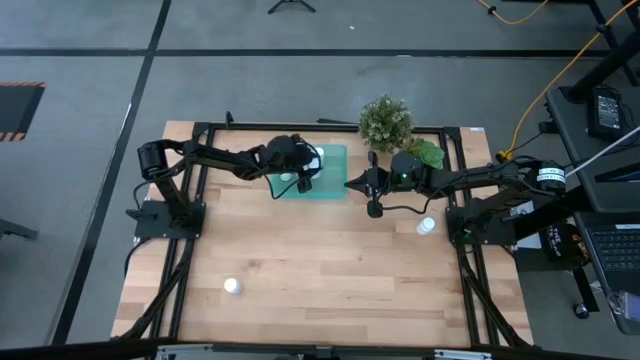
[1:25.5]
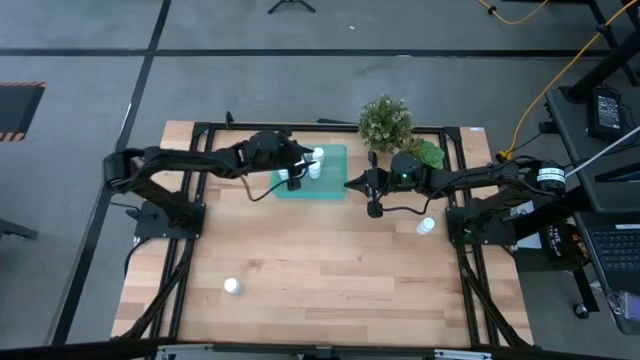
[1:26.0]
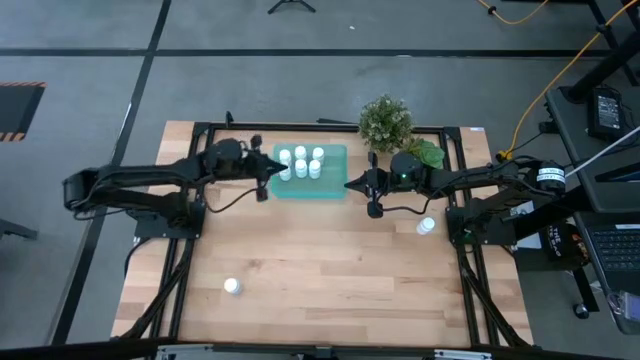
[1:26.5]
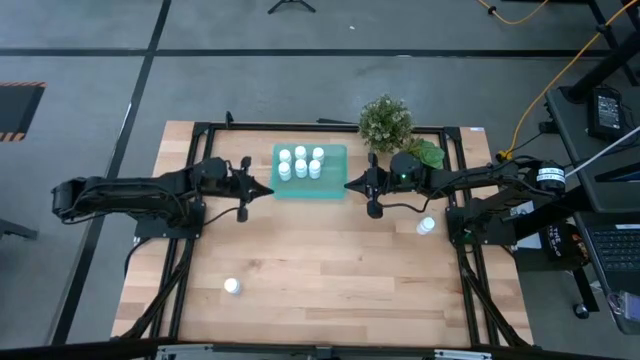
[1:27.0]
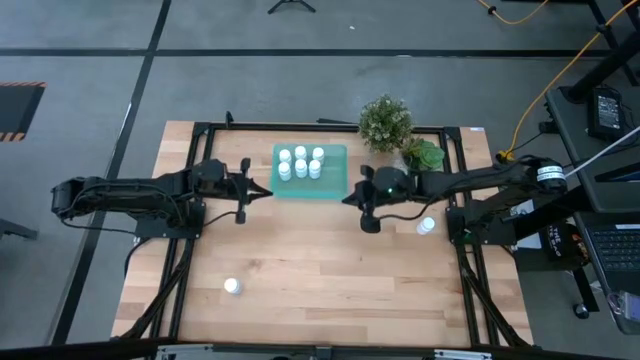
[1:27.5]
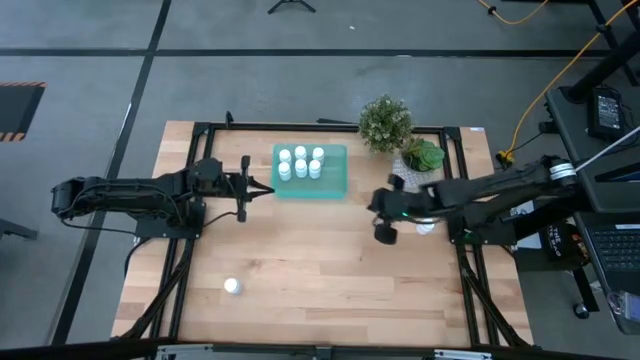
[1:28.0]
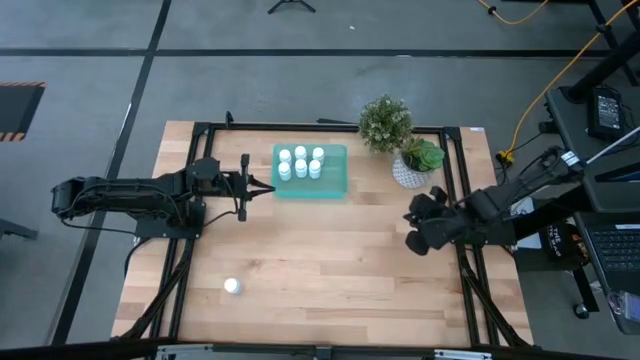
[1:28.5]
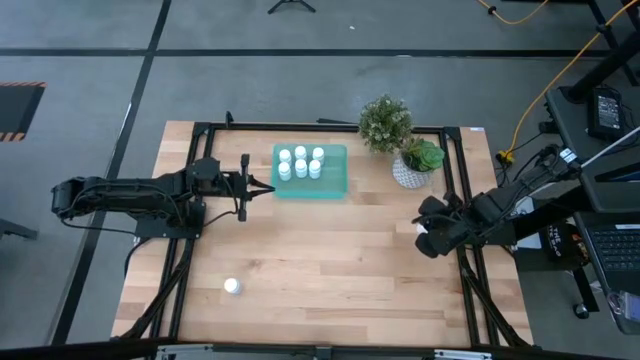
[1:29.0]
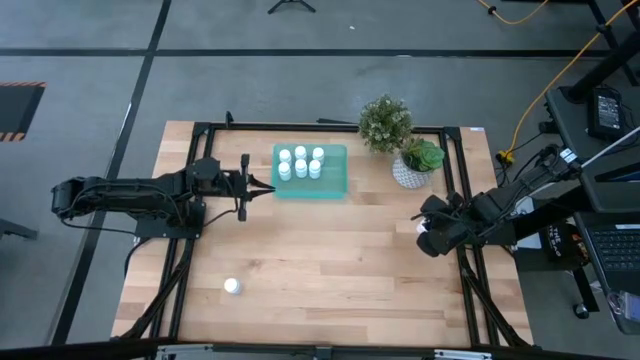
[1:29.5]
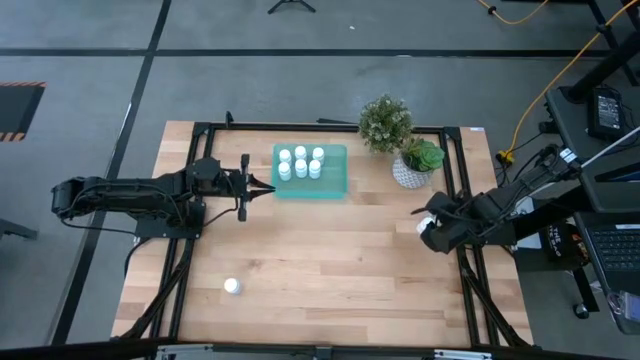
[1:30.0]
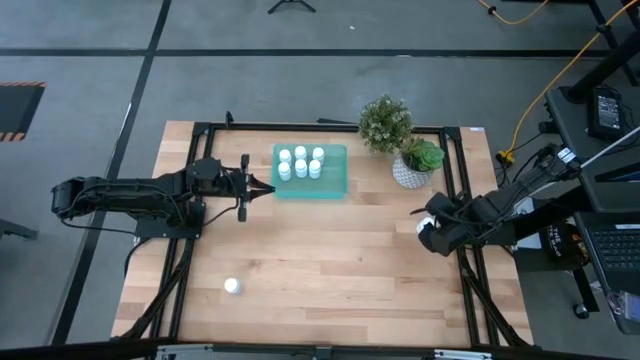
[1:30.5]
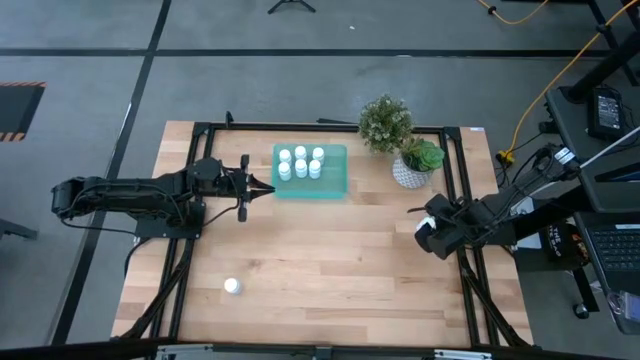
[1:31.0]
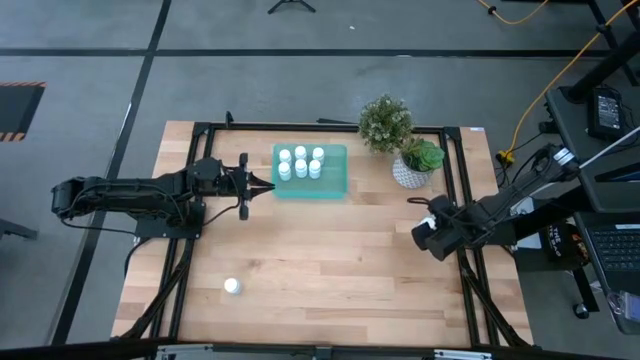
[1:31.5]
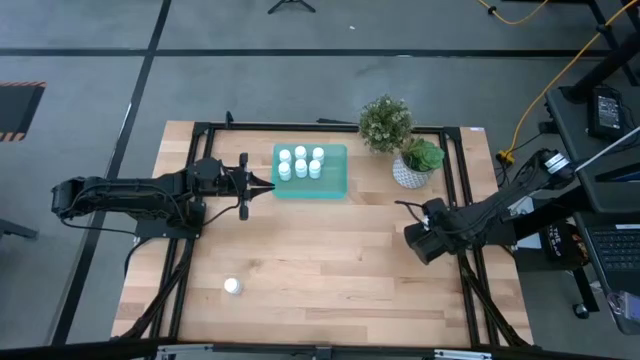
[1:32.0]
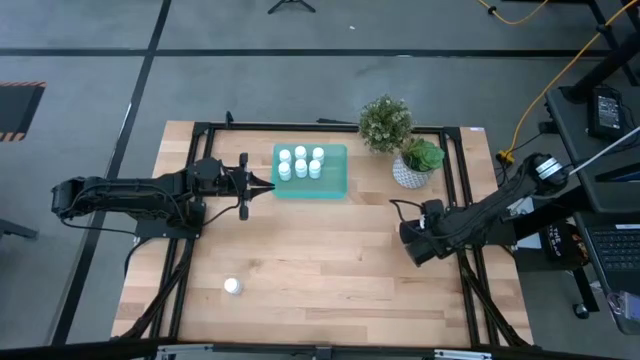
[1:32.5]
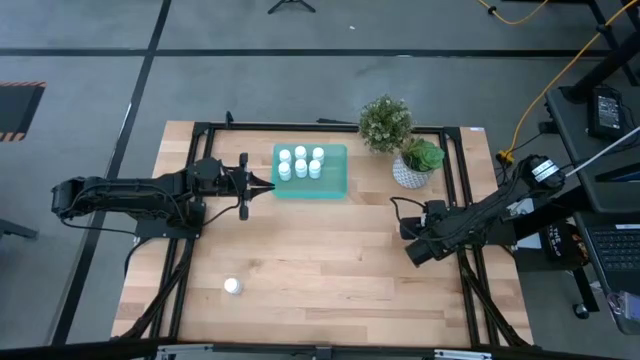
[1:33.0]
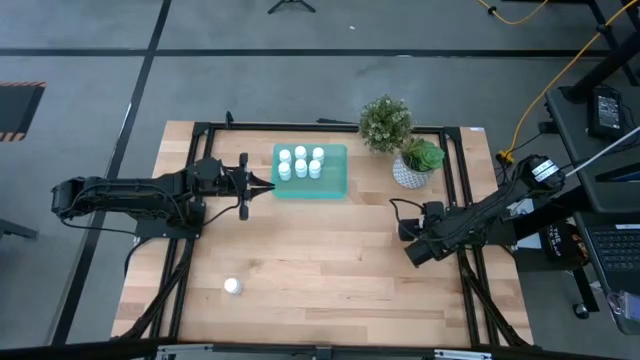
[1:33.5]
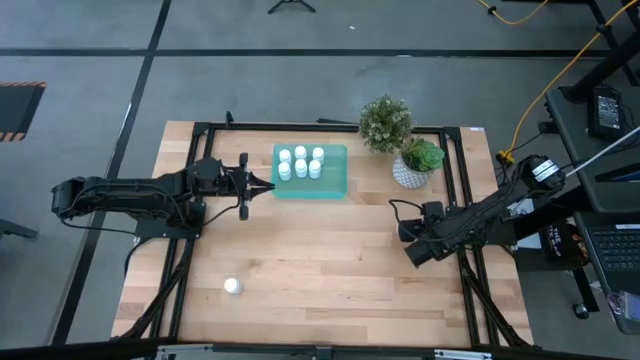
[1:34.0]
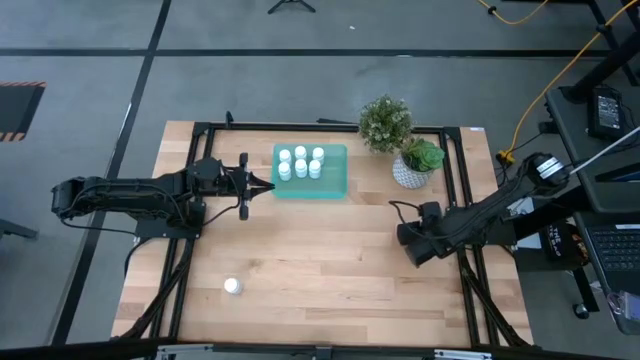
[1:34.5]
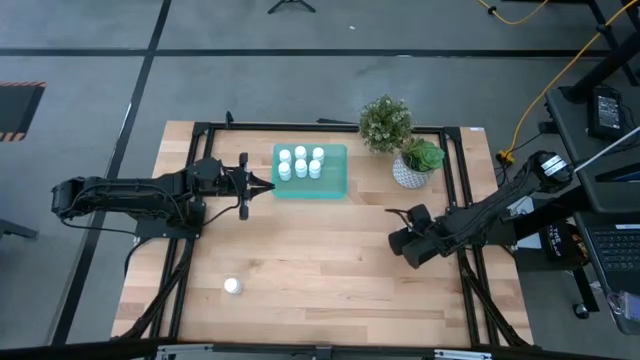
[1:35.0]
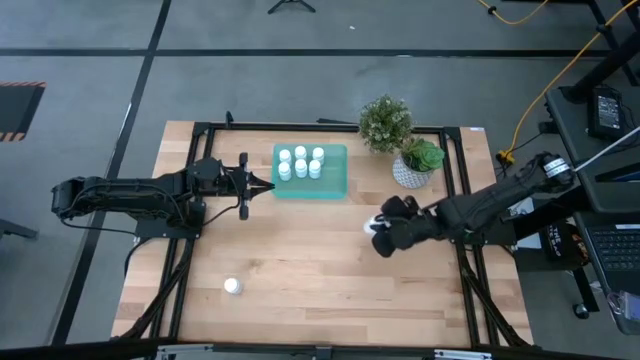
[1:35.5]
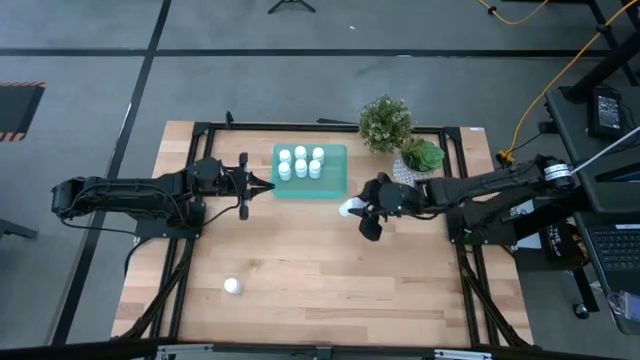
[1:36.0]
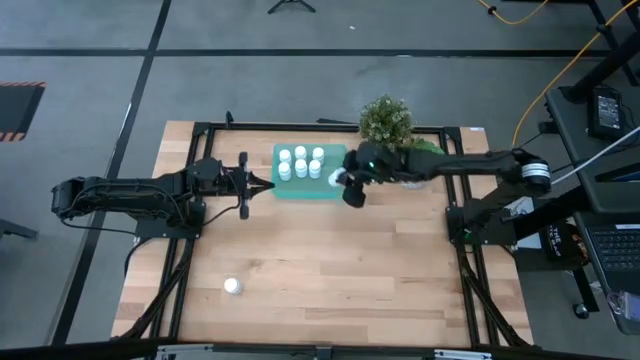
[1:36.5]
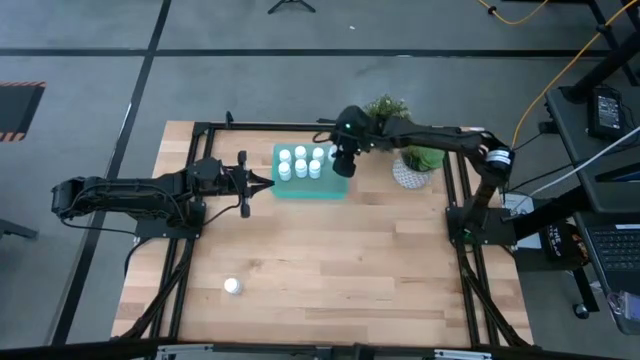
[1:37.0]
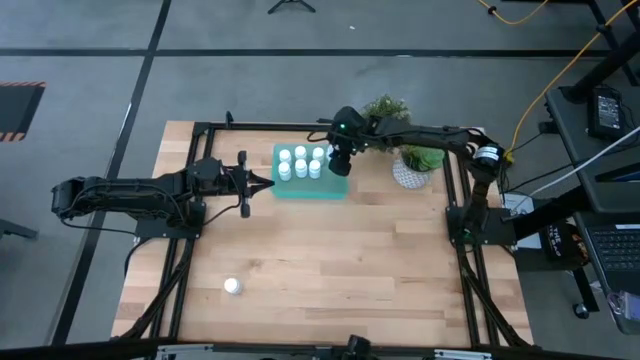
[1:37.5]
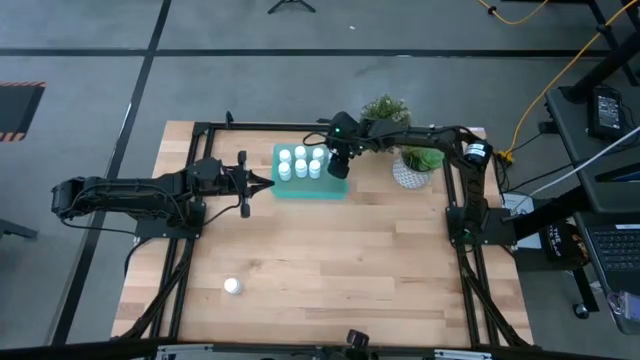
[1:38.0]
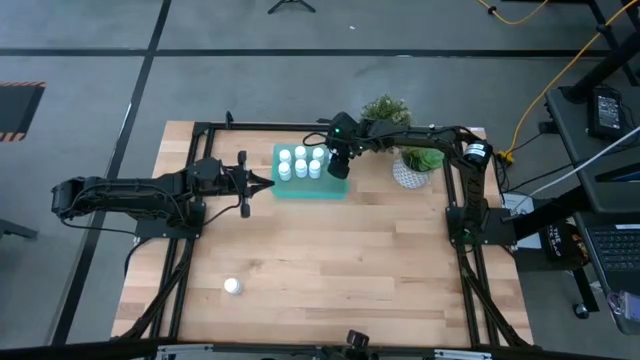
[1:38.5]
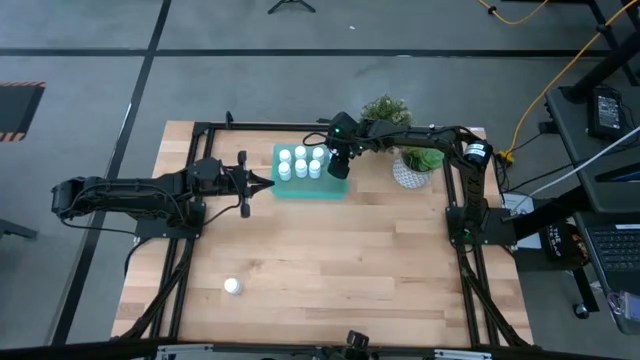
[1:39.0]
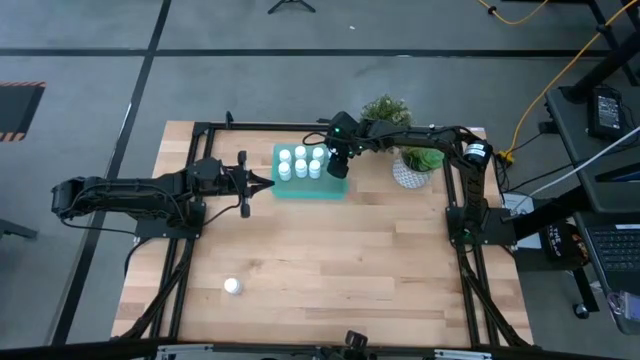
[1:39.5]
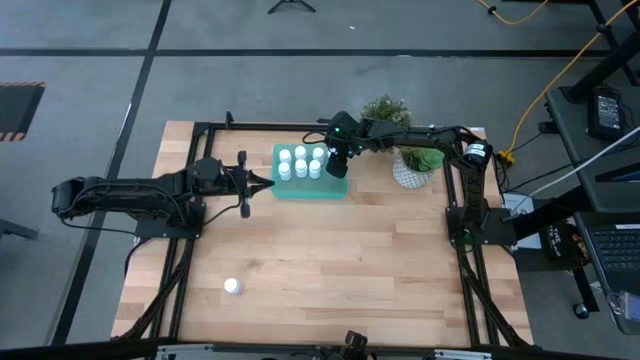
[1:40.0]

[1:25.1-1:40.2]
Task: Pick and place pill bottles into a basket
Put the white pill bottle into the green bin
